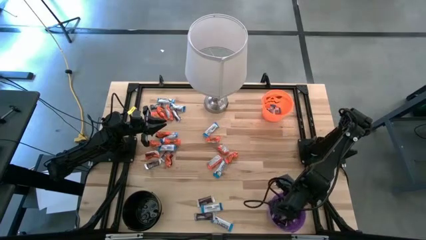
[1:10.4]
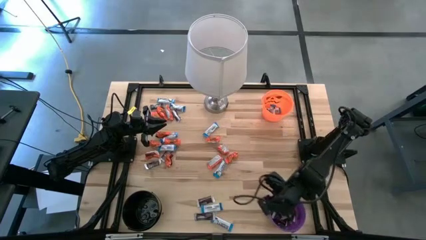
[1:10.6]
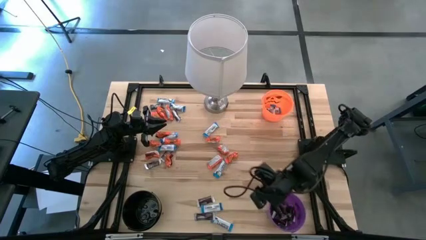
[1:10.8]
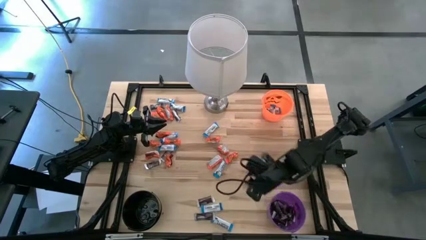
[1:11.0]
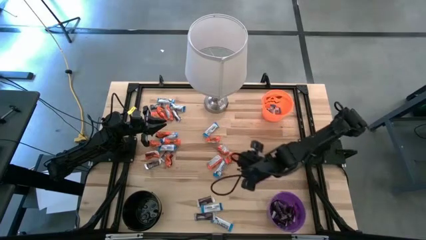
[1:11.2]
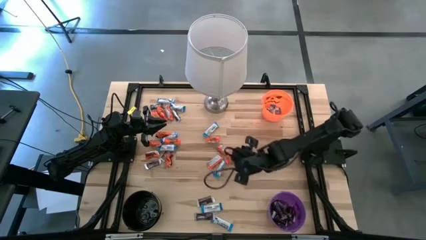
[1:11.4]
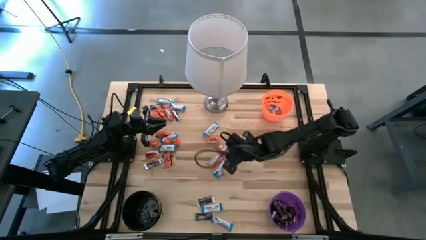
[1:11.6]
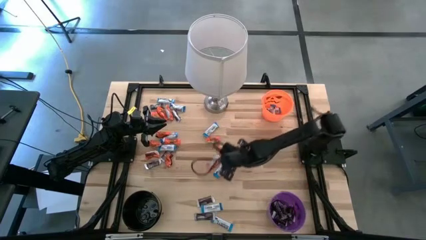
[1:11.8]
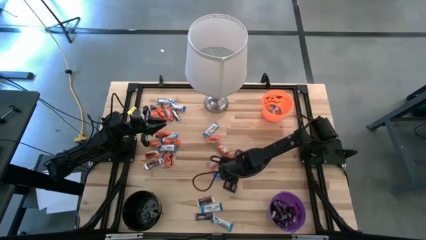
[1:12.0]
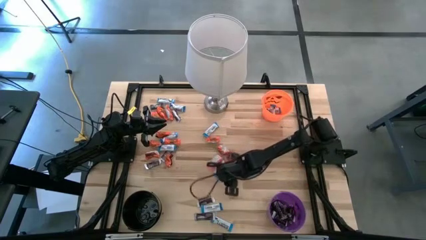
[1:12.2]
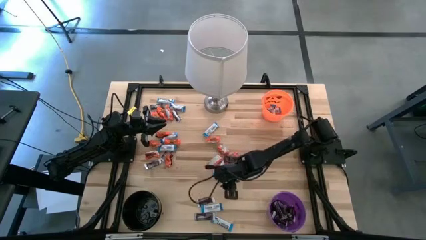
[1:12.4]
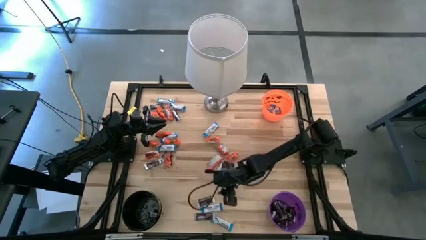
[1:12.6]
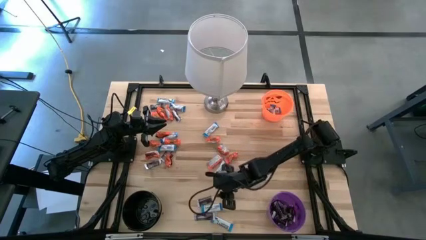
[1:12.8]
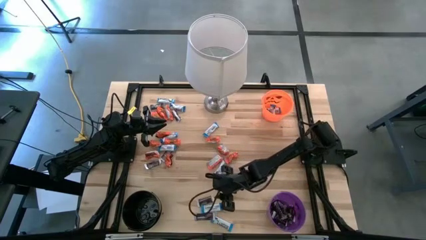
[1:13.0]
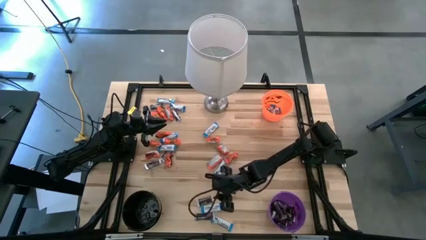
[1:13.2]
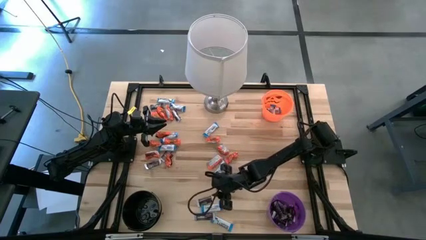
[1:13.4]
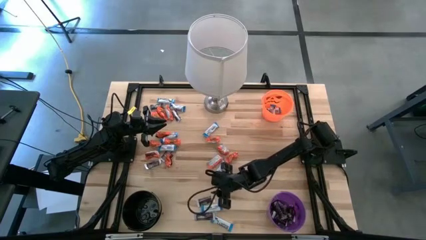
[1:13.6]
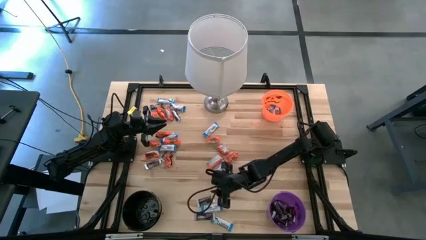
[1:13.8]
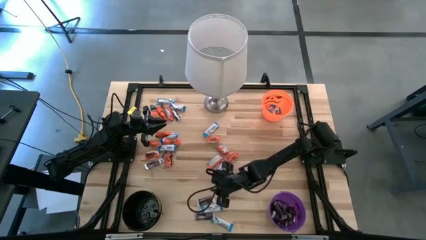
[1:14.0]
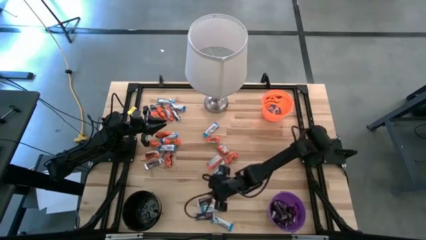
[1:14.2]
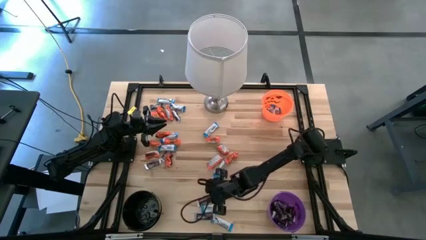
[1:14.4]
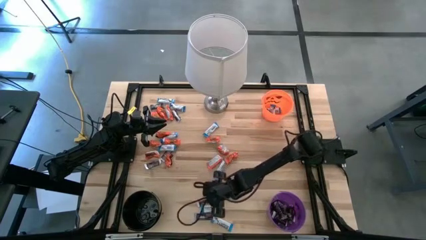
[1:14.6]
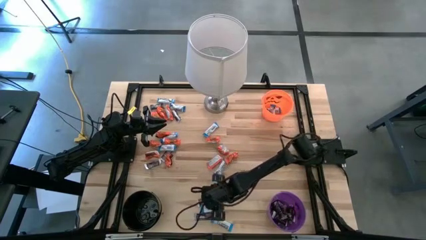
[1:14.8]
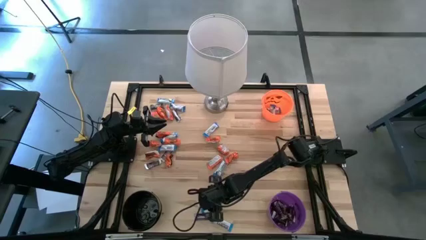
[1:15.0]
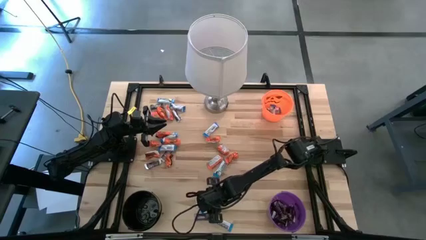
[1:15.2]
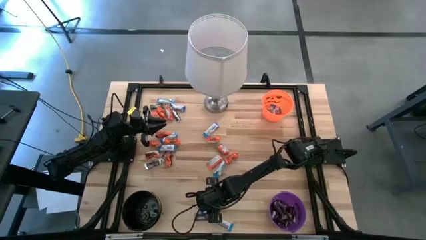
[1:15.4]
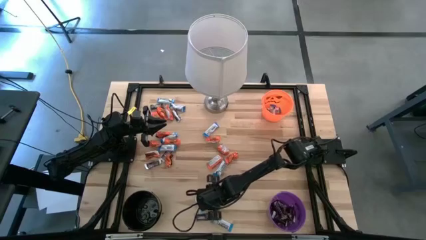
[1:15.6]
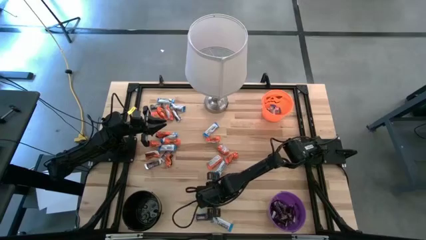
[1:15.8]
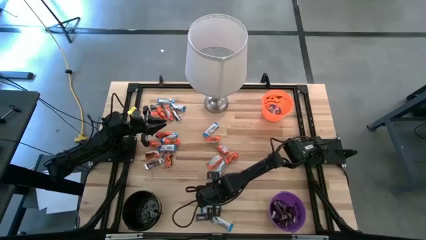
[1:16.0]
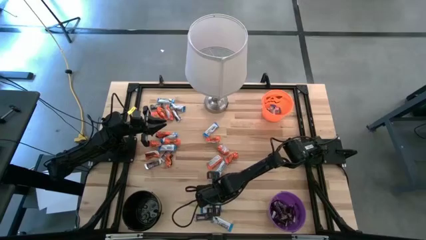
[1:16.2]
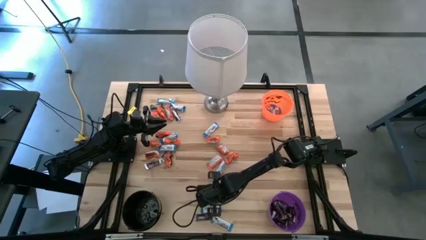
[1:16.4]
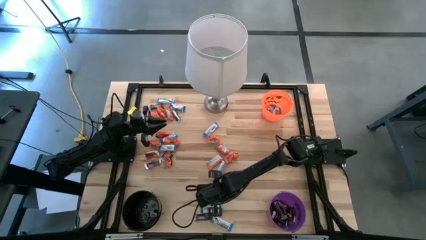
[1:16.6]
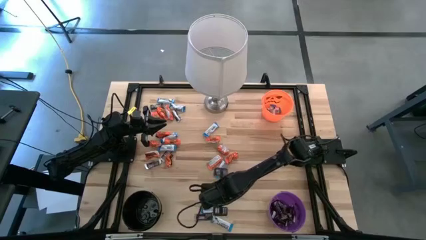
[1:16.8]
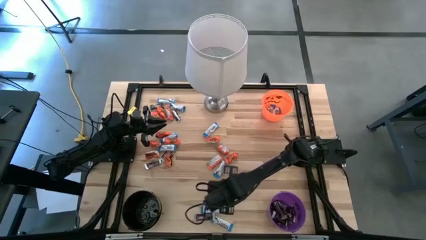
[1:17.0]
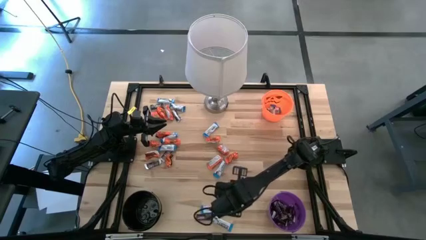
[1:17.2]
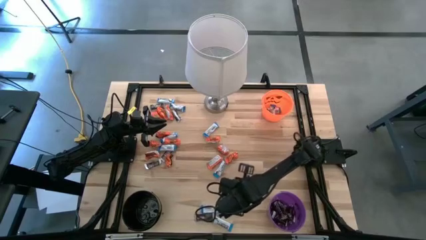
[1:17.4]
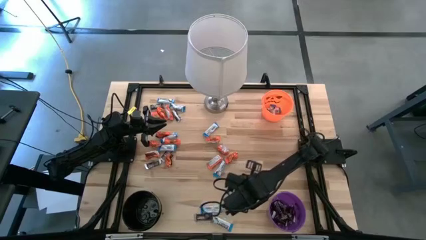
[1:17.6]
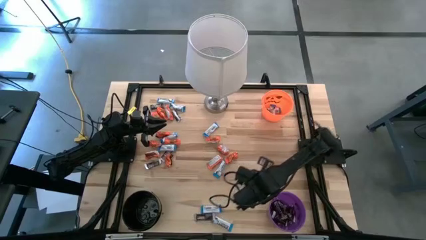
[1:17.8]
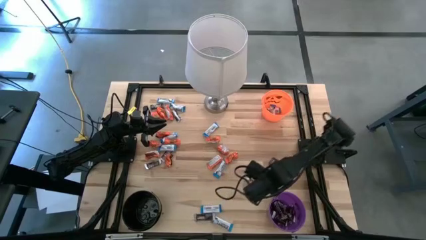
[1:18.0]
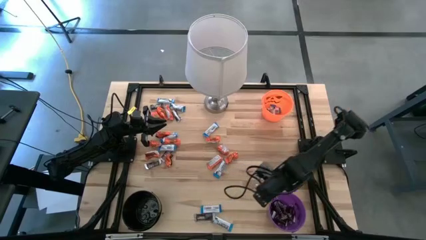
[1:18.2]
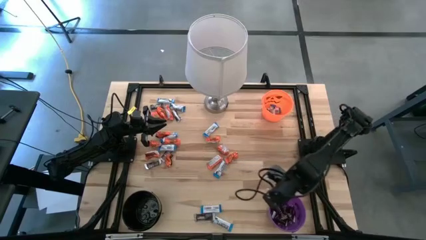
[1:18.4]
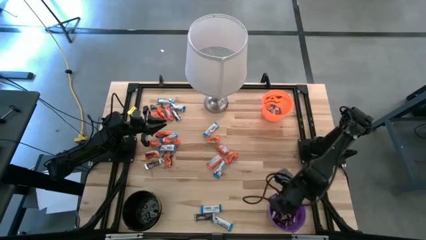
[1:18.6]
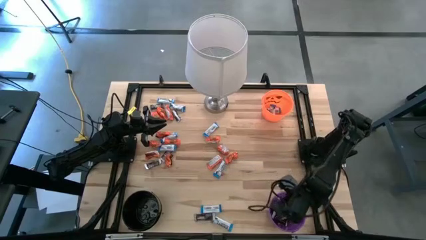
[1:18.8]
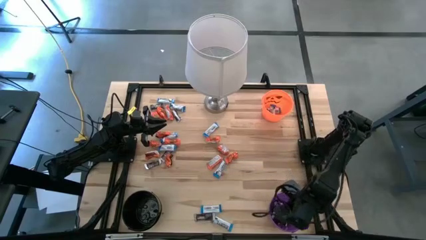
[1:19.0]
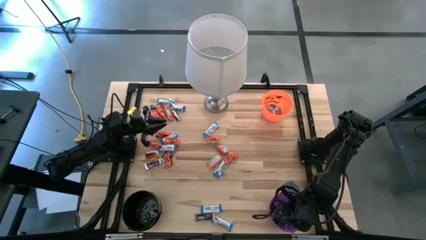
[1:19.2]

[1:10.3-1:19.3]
Task: Sort candy
Put the brown chocolate bar into the violet bucket

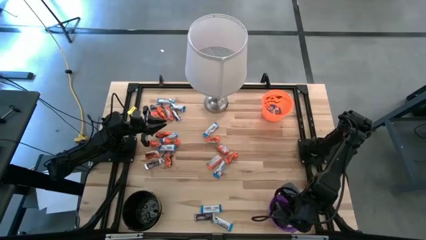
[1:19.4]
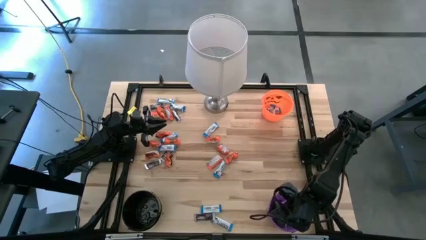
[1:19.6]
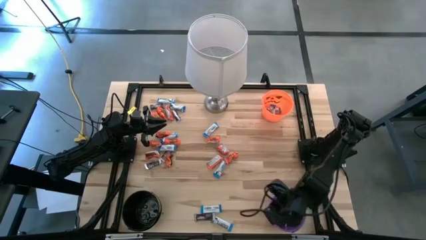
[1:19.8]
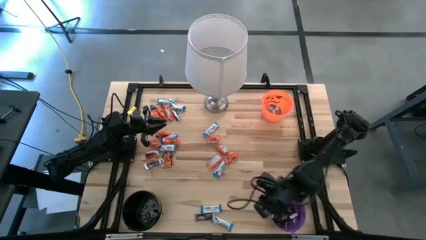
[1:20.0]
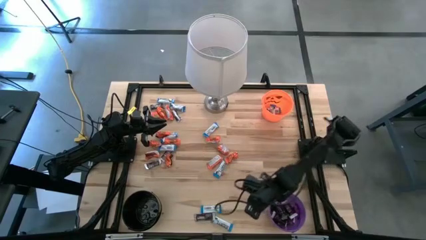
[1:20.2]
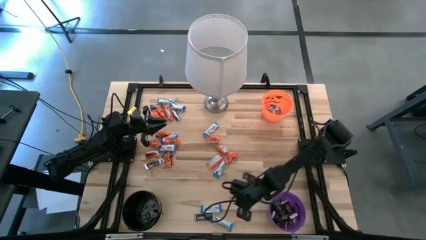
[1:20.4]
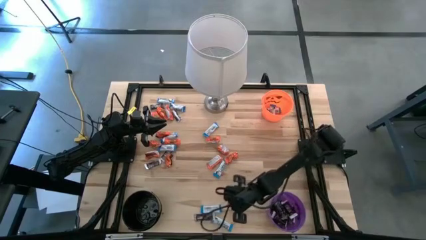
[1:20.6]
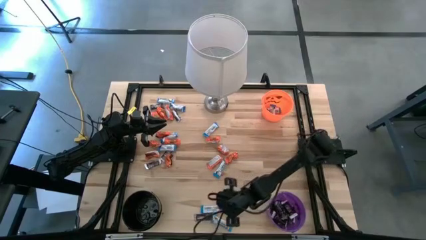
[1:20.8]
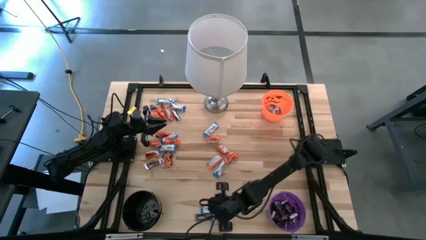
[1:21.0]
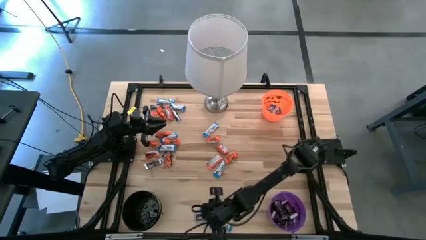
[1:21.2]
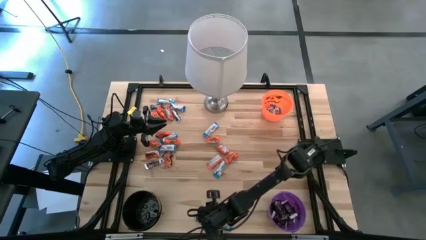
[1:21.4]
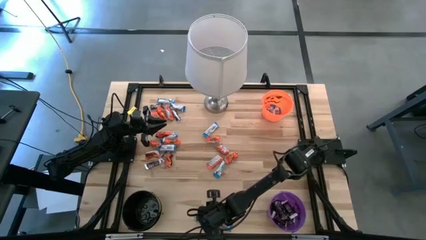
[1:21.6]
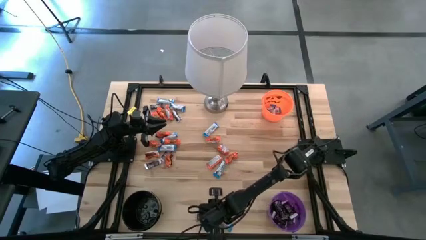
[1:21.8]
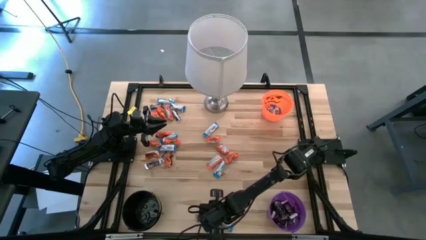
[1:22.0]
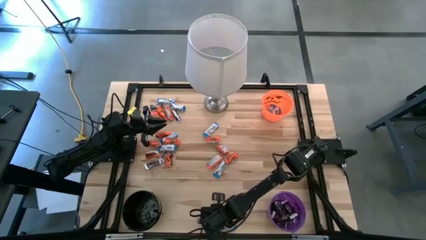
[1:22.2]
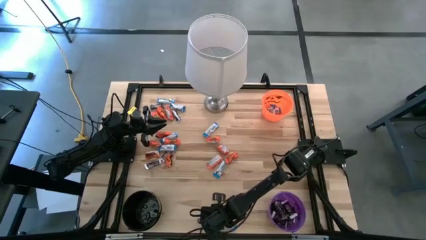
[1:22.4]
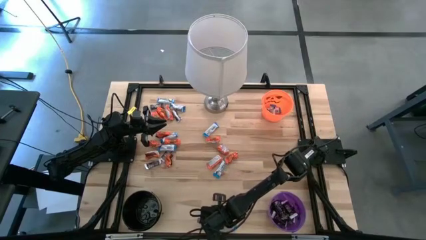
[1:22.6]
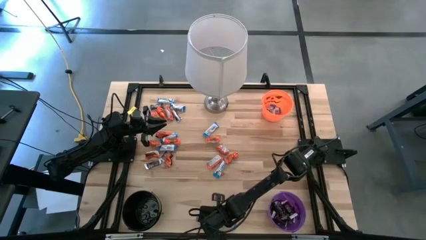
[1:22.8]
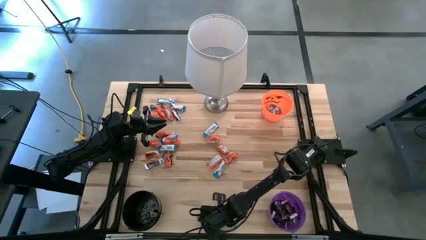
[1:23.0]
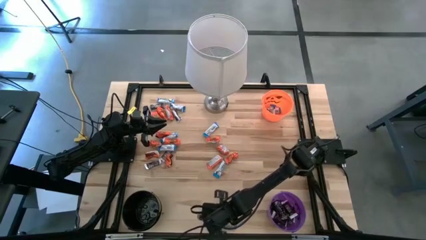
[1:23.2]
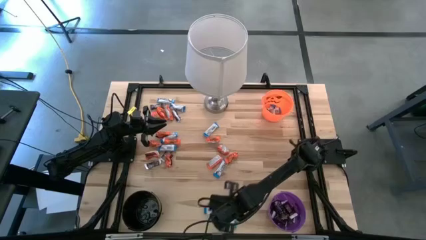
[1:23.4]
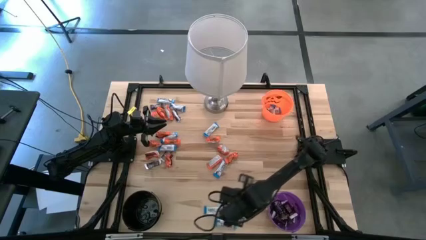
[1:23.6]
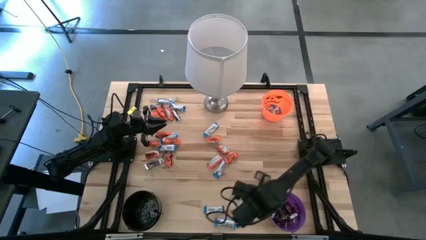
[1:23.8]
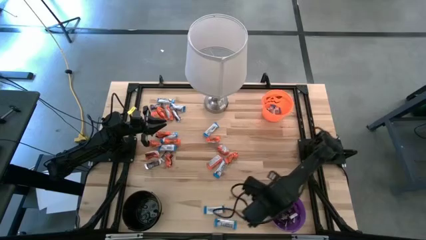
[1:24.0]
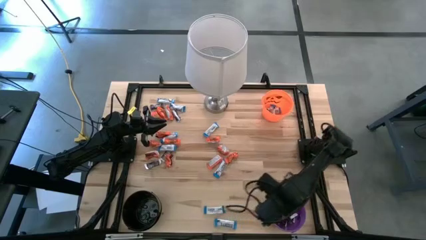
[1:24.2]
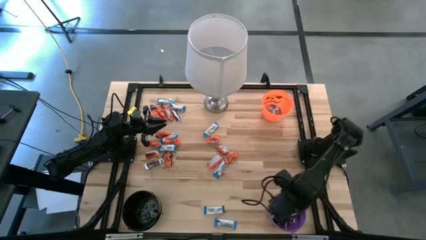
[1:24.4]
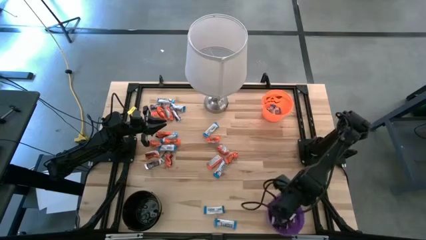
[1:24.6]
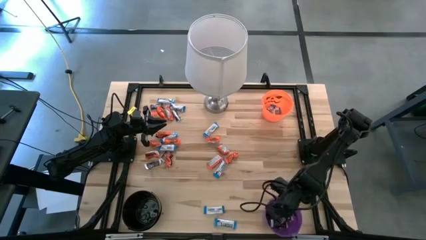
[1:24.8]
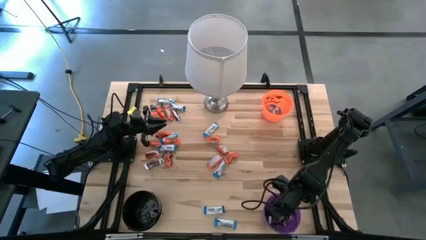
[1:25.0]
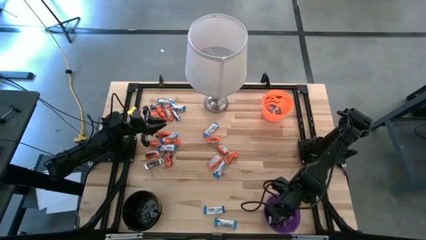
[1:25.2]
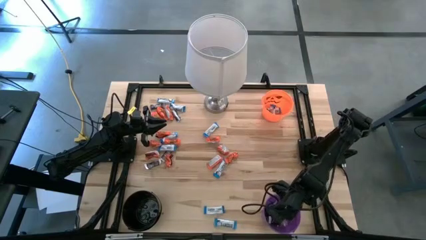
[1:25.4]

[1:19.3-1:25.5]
Put the brown chocolate bar into the violet bucket
